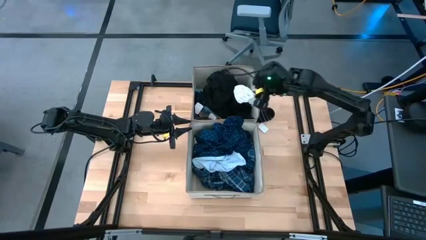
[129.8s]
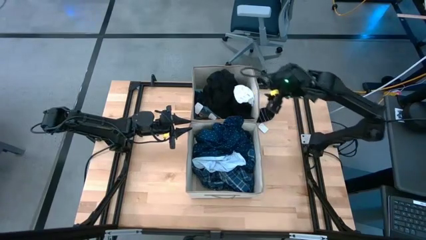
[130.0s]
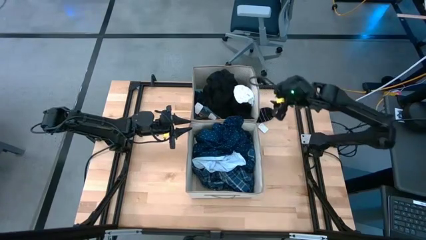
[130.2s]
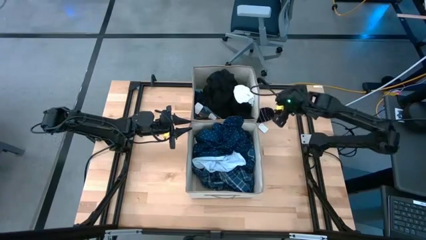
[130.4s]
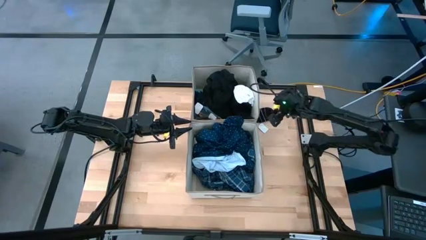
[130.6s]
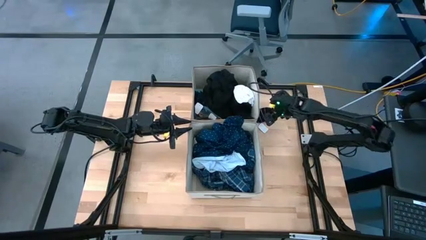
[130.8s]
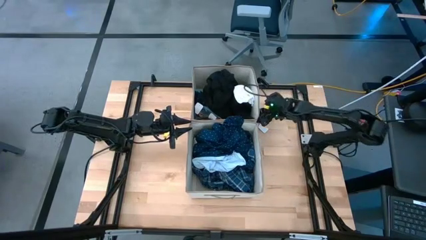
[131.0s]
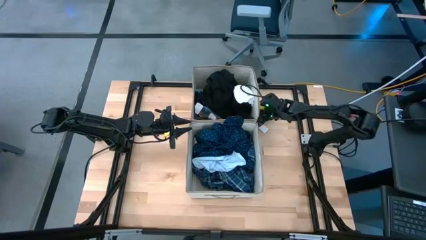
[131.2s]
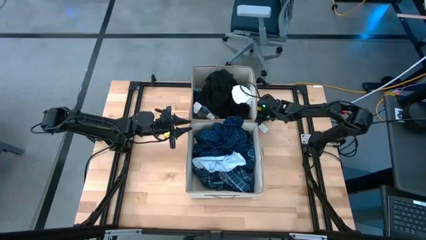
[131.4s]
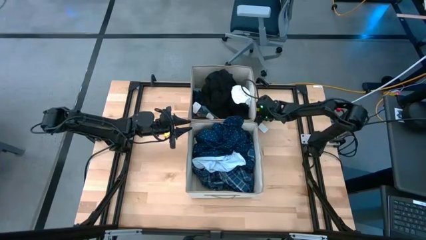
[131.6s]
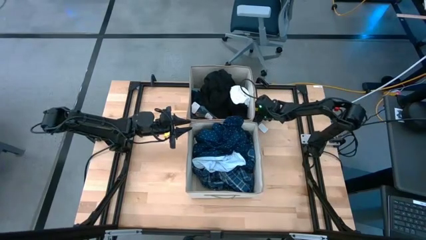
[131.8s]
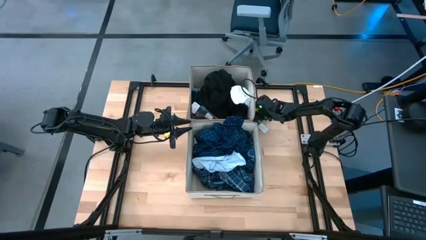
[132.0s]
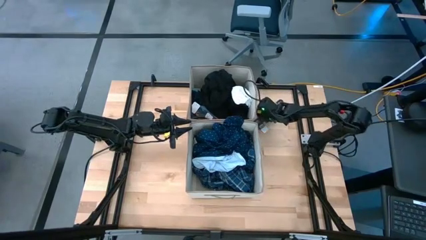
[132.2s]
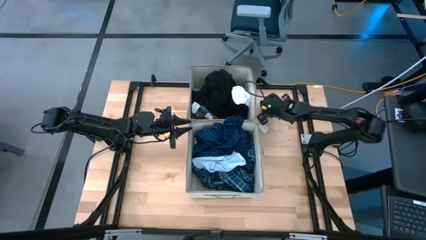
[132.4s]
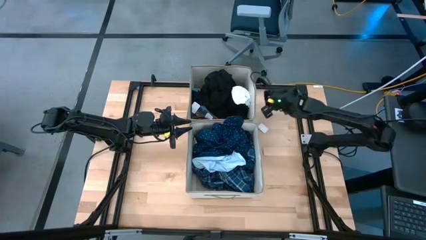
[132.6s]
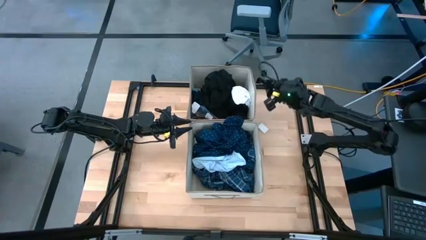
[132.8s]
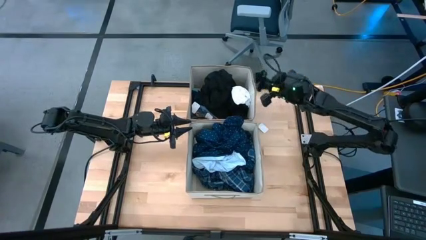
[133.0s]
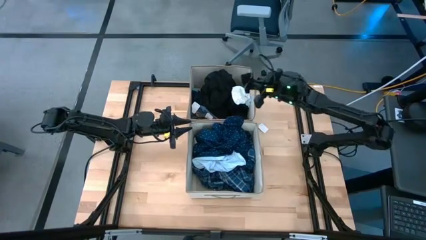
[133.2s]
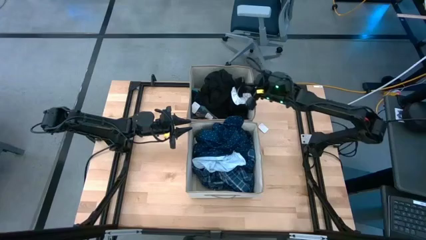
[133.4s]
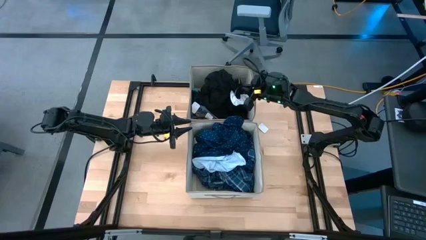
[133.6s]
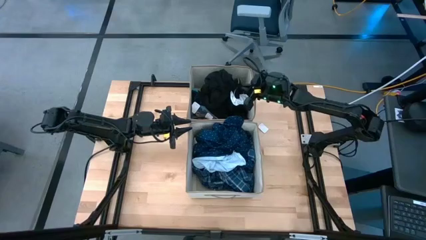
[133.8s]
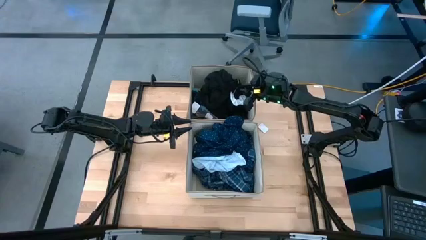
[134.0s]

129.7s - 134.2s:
Task: Sort clothes
Put the black sock into the top laundry organizer

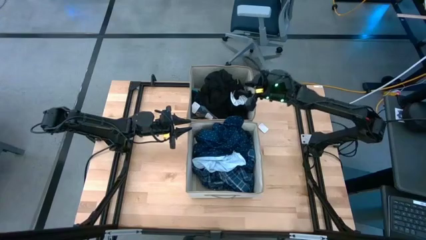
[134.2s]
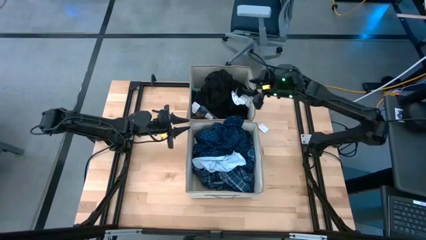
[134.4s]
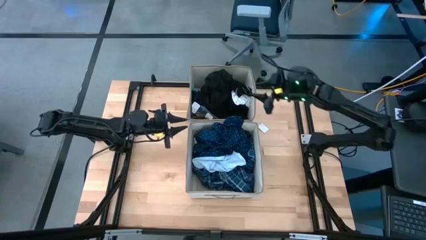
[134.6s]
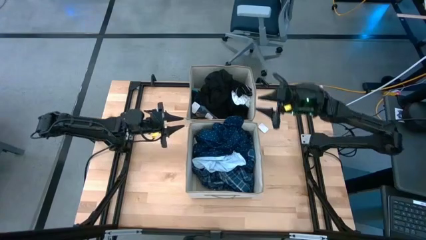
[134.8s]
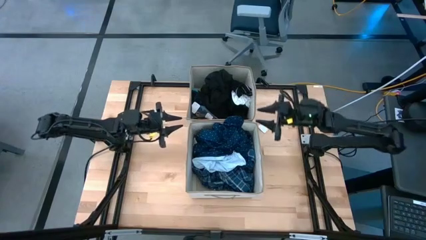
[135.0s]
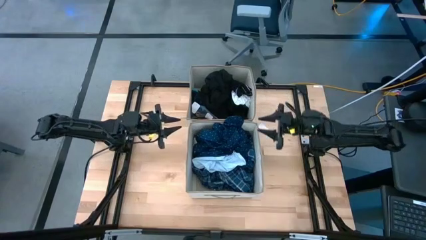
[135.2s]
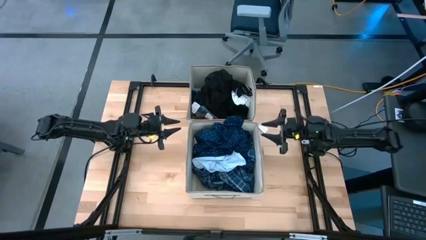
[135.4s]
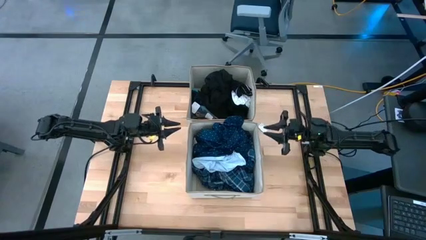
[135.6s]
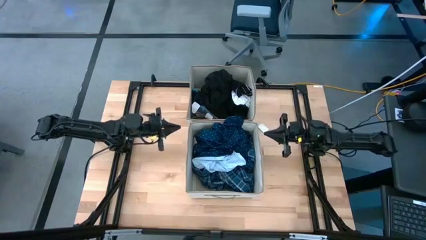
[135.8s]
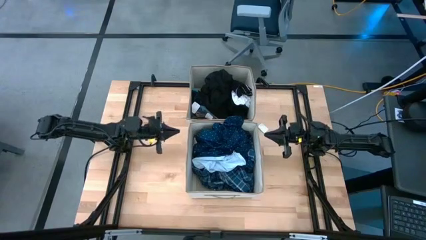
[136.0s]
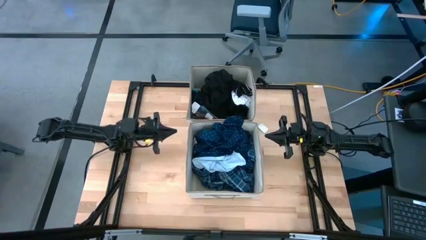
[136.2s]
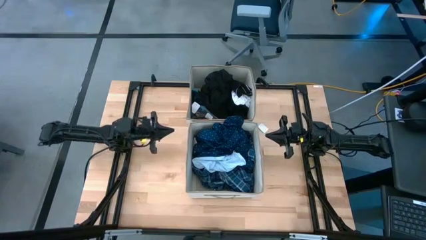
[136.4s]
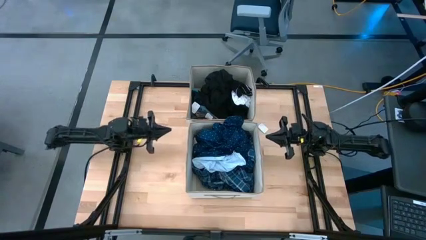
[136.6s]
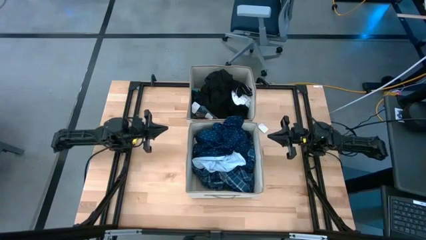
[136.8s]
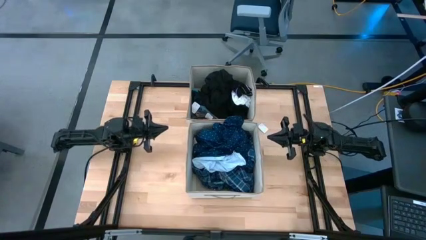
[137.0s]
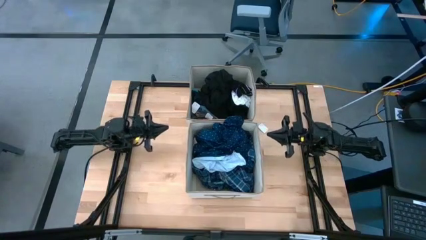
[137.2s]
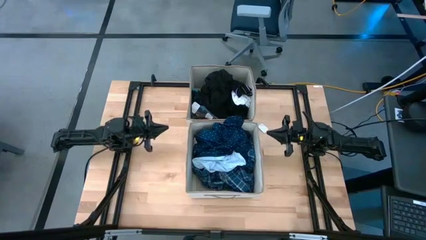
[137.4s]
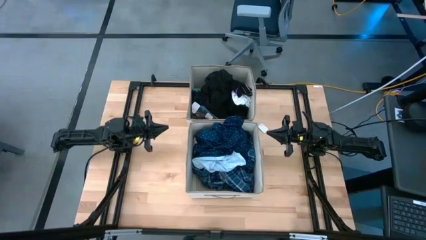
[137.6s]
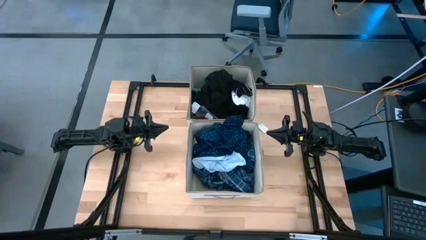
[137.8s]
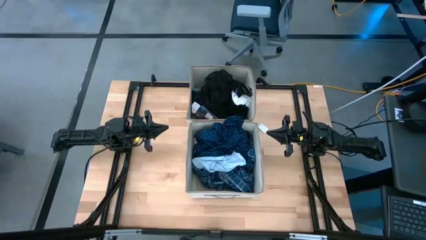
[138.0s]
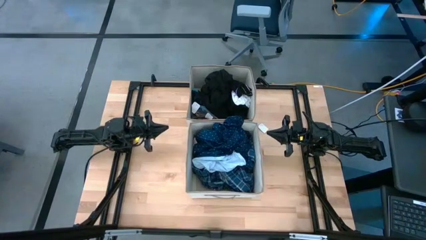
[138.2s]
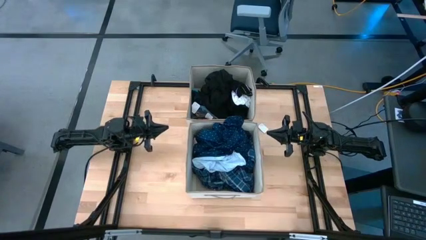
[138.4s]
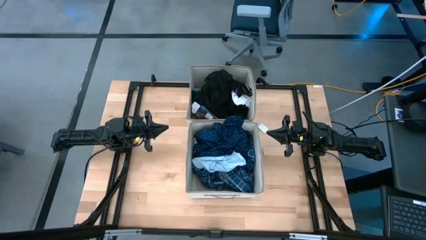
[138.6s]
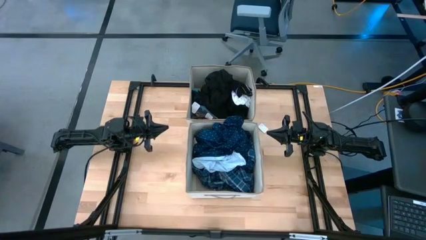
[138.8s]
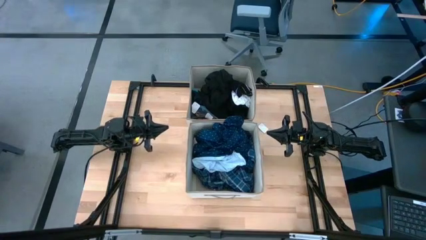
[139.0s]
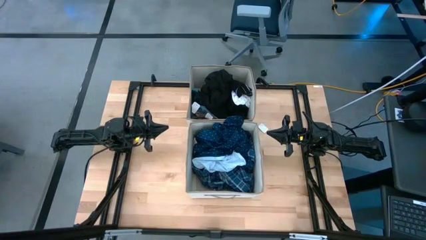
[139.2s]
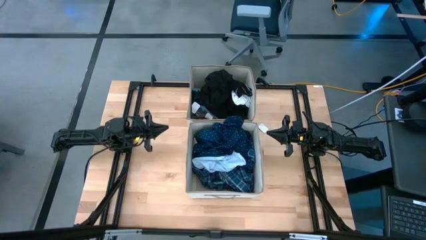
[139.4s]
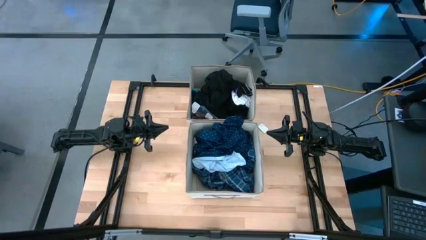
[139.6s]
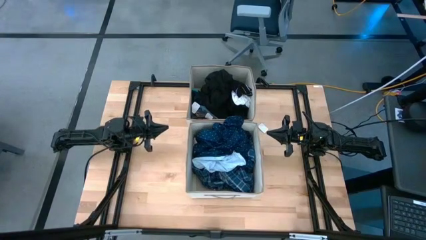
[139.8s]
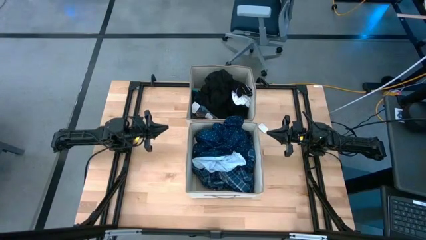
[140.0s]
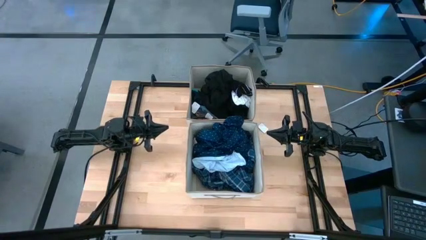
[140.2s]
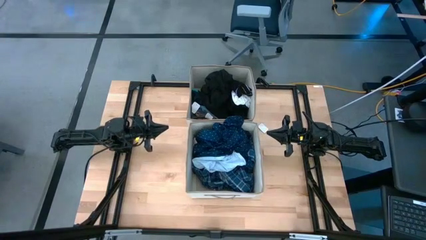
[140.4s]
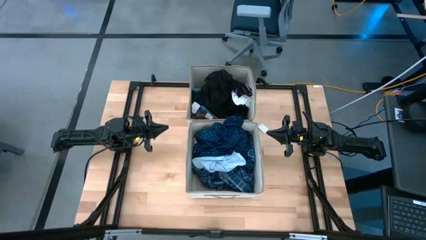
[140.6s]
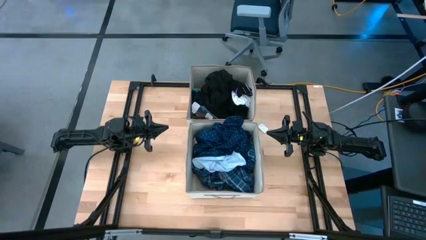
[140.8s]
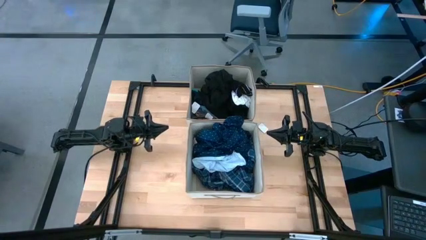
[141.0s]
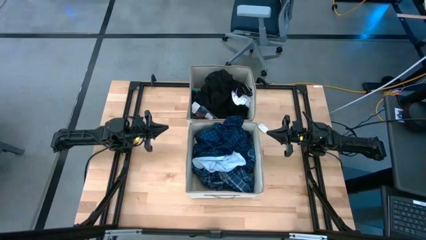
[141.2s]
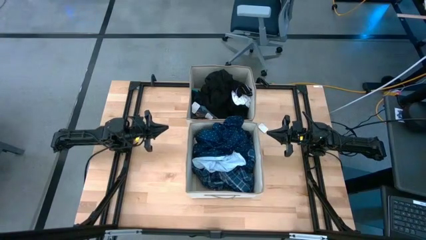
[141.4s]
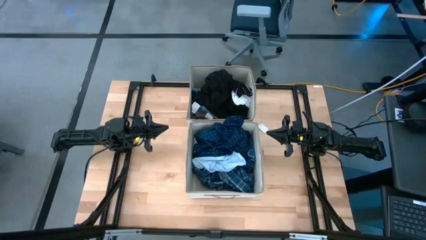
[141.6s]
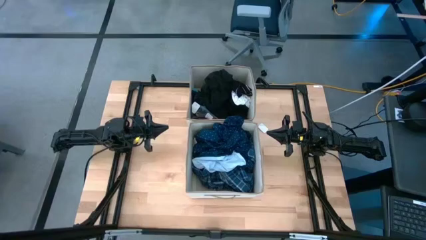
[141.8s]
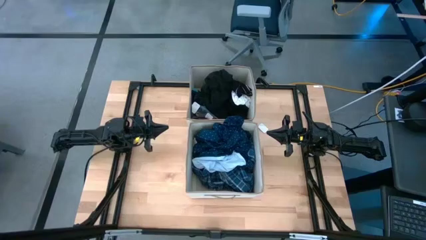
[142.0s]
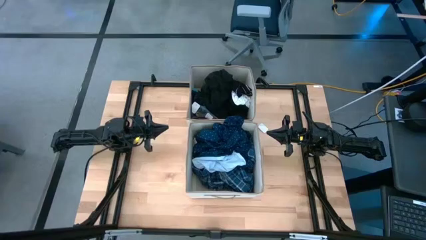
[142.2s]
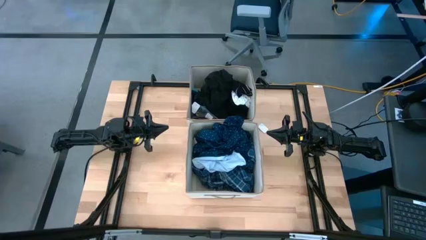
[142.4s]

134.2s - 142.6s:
Return to Home Position

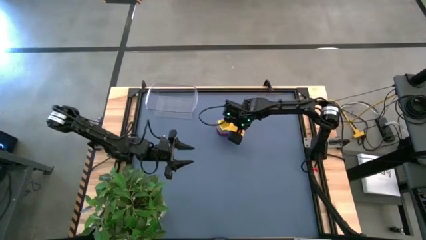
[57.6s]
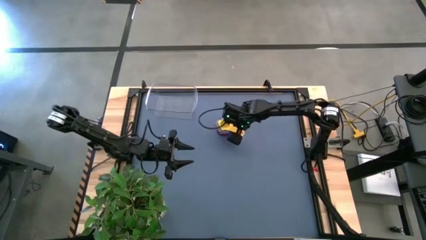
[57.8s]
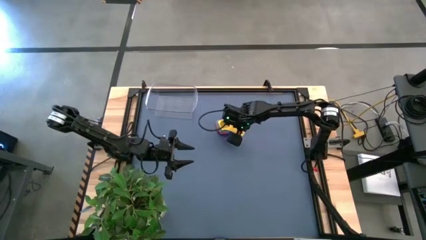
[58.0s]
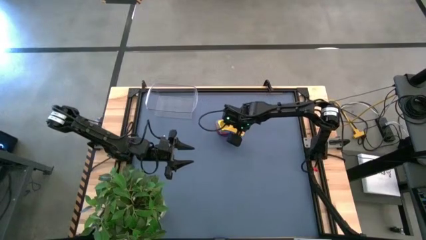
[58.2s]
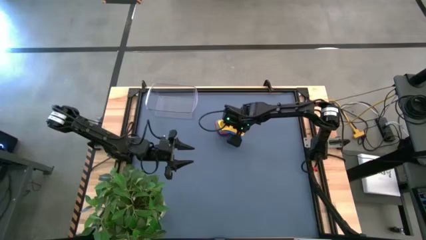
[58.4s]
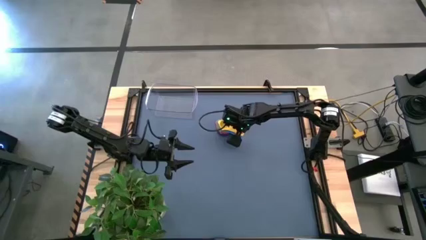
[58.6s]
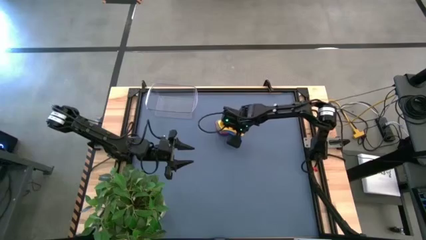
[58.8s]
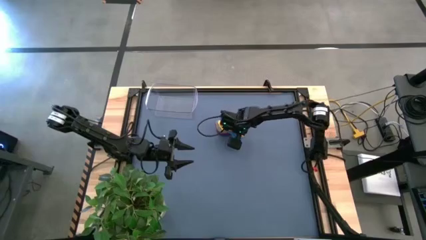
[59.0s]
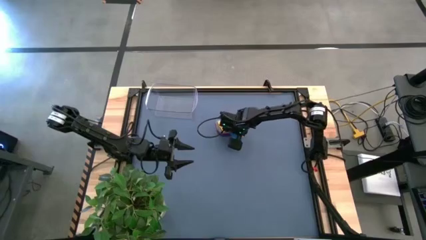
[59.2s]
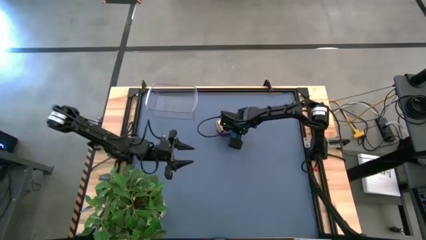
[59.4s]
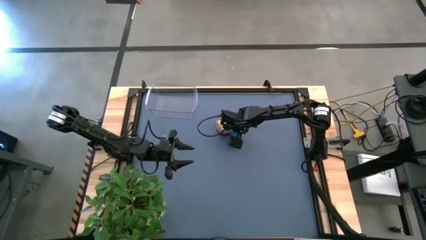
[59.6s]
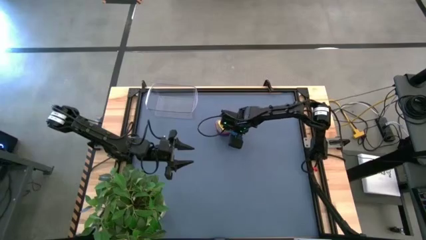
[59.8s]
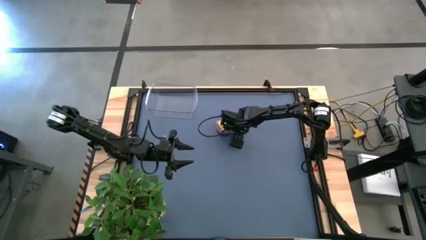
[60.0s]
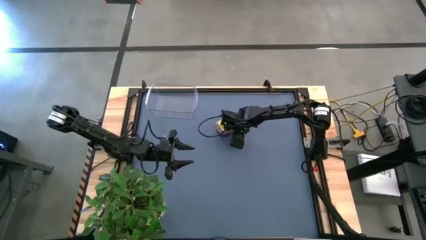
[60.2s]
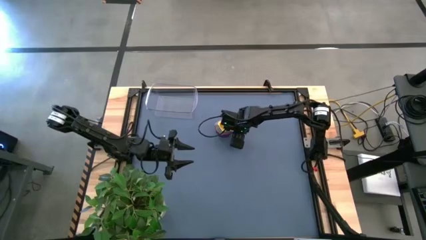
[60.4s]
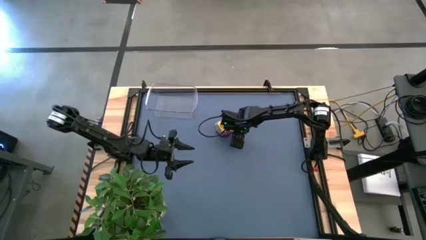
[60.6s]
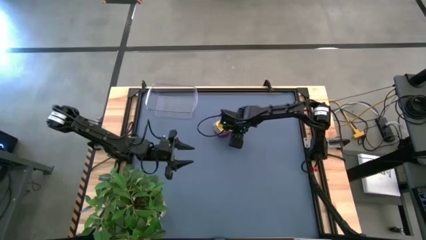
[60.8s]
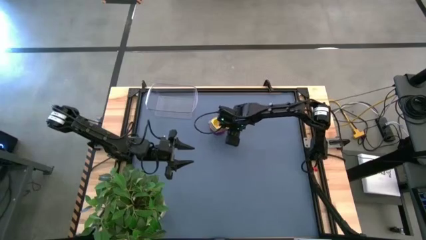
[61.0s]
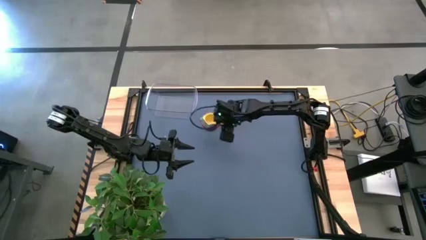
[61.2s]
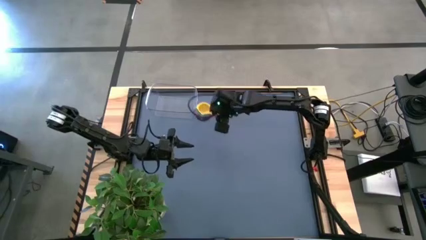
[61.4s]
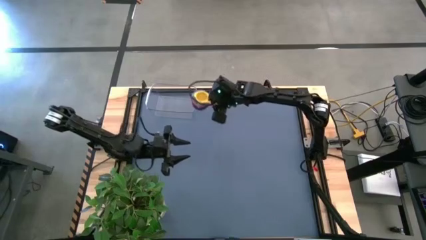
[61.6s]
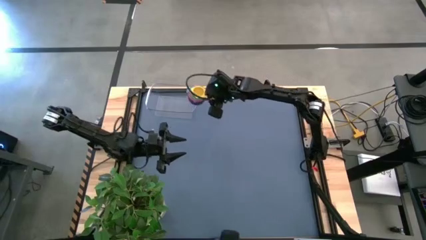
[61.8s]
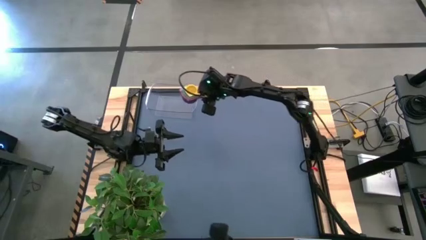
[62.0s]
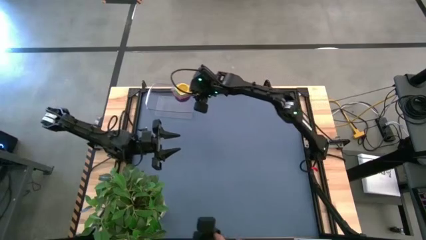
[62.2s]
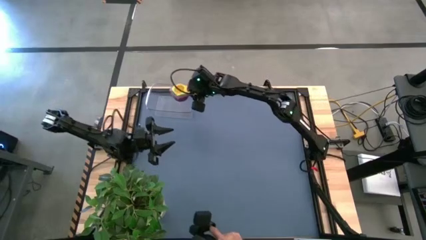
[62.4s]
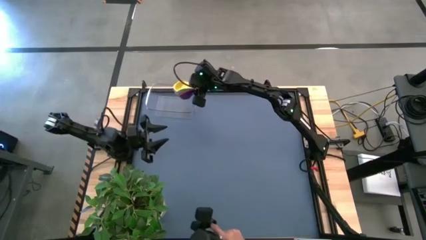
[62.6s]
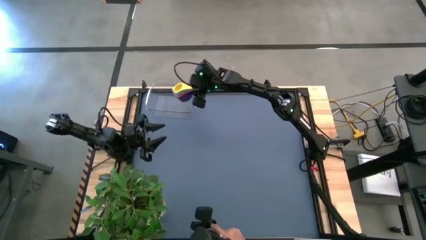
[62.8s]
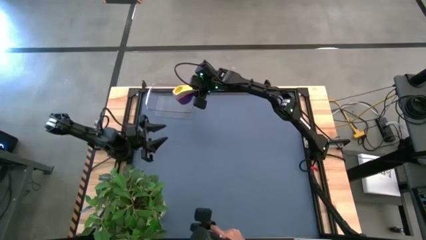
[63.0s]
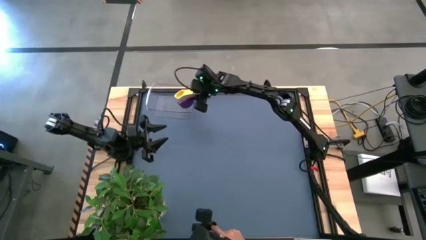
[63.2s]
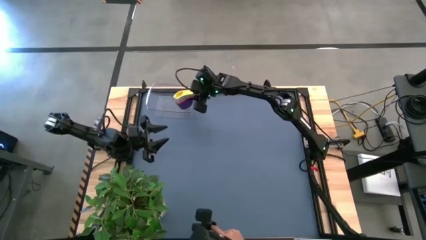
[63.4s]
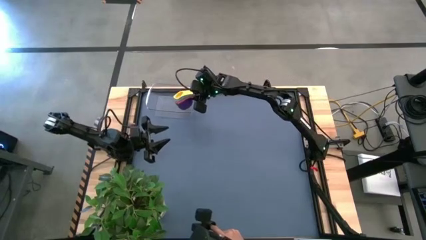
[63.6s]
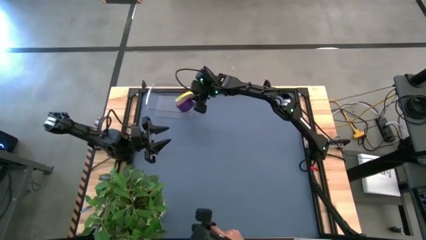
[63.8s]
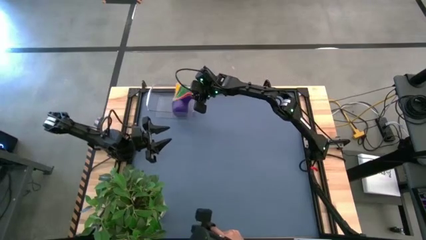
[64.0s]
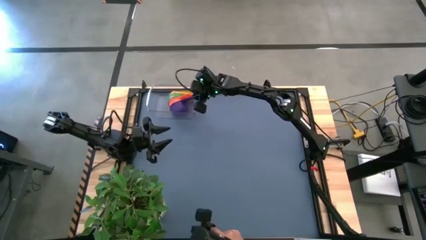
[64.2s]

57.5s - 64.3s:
Task: Nest measuring cups in basket
Put the nested measuring cups into the transparent bin
